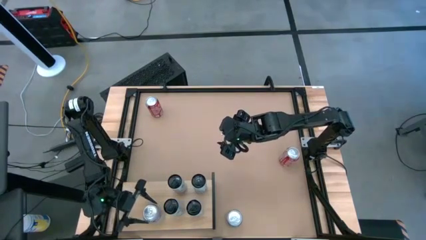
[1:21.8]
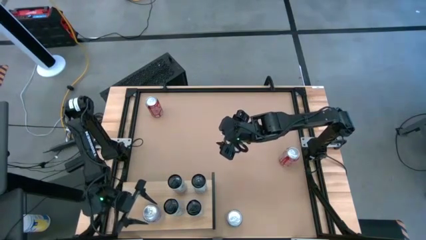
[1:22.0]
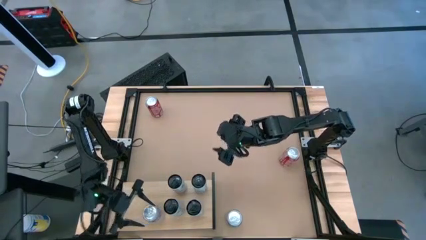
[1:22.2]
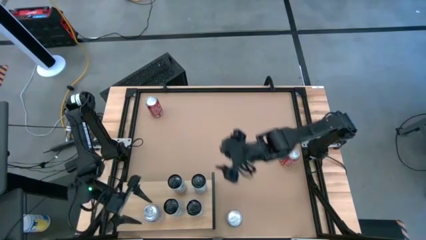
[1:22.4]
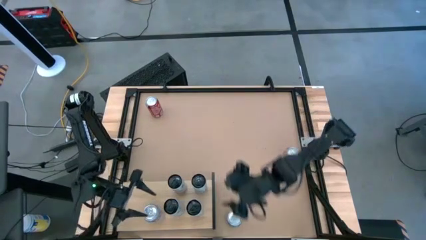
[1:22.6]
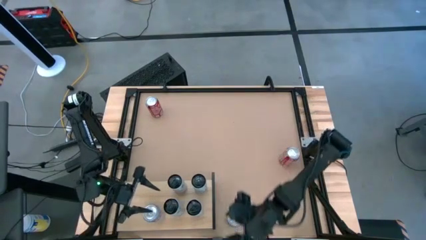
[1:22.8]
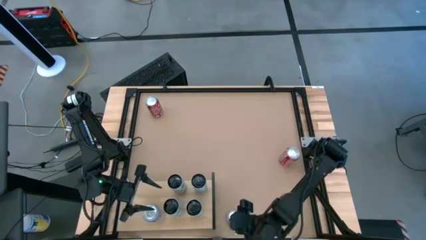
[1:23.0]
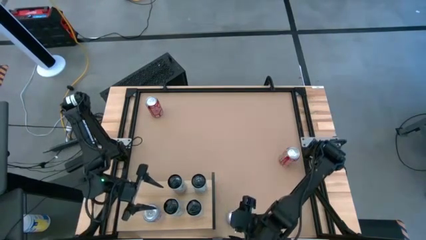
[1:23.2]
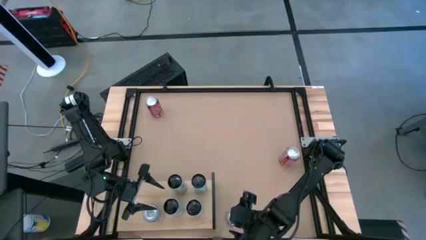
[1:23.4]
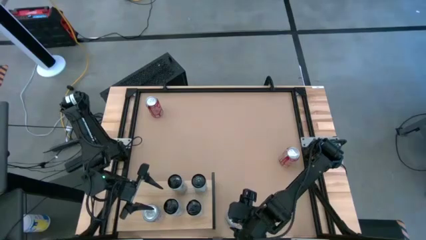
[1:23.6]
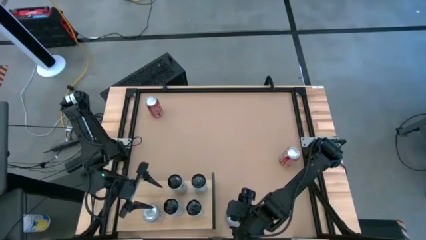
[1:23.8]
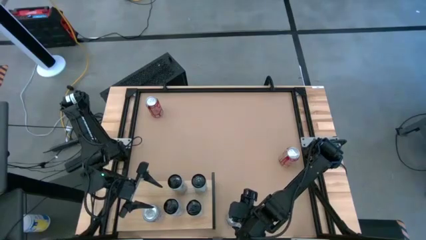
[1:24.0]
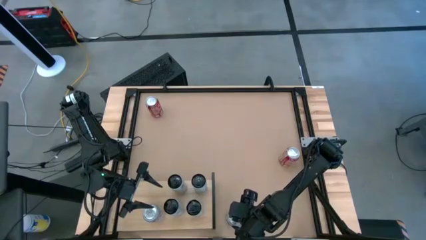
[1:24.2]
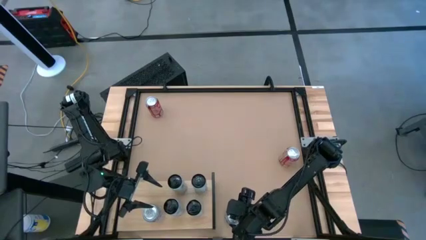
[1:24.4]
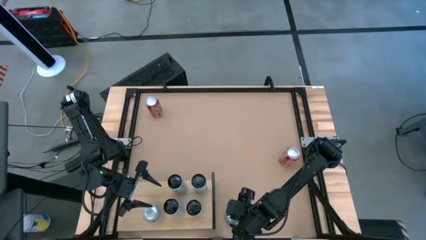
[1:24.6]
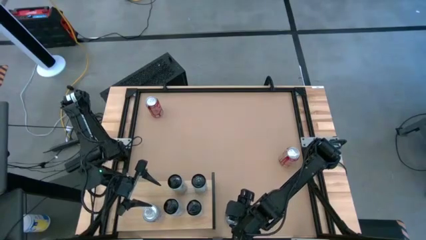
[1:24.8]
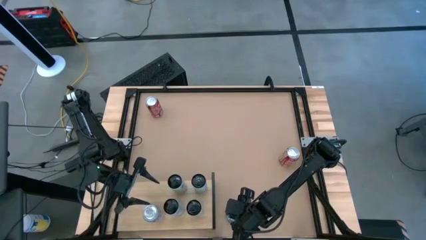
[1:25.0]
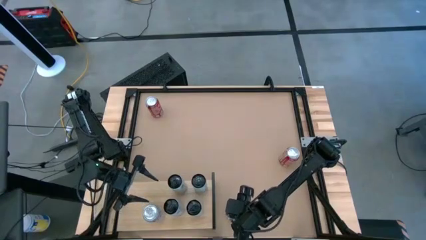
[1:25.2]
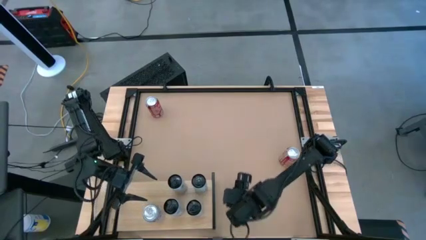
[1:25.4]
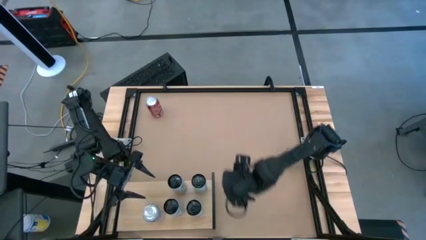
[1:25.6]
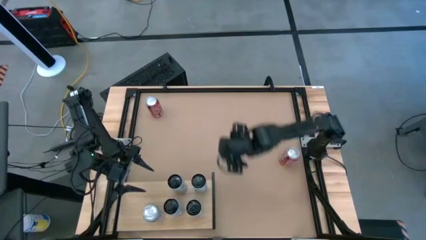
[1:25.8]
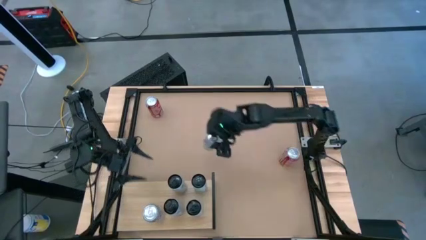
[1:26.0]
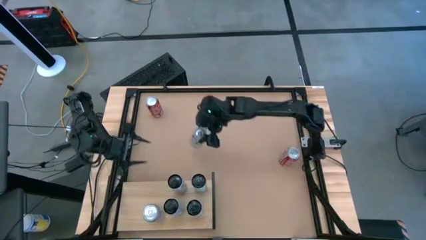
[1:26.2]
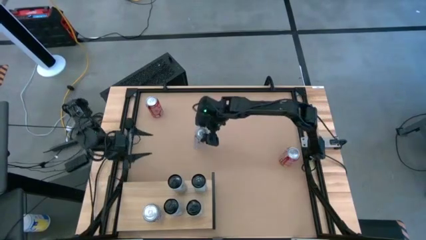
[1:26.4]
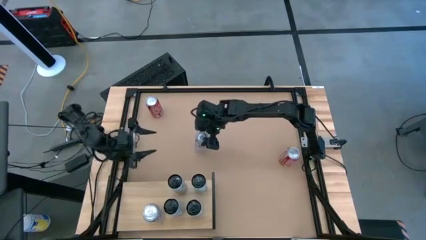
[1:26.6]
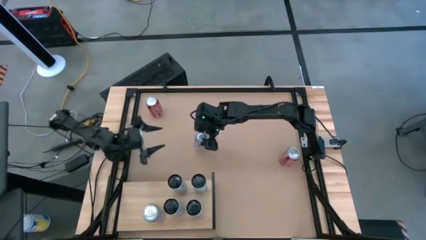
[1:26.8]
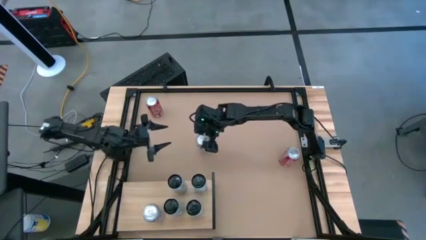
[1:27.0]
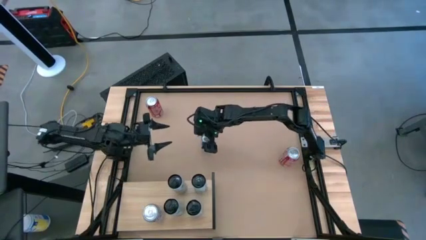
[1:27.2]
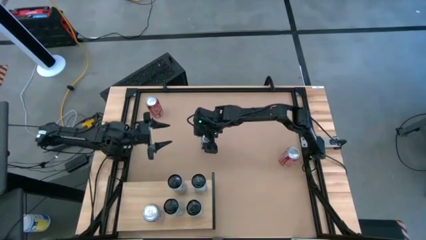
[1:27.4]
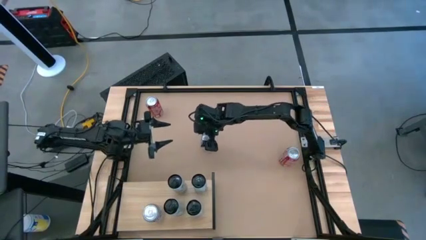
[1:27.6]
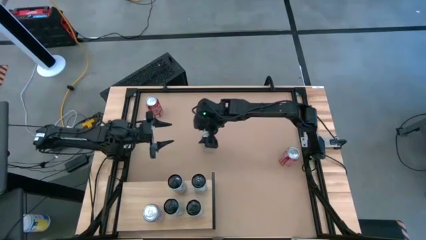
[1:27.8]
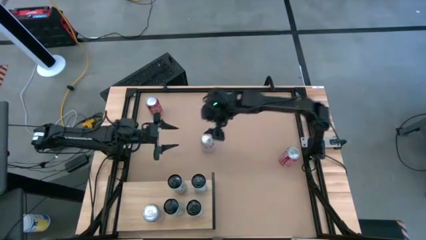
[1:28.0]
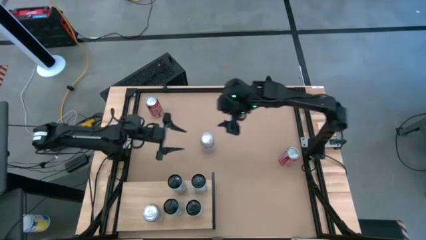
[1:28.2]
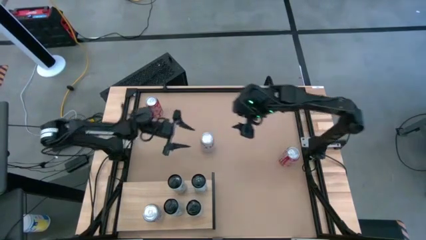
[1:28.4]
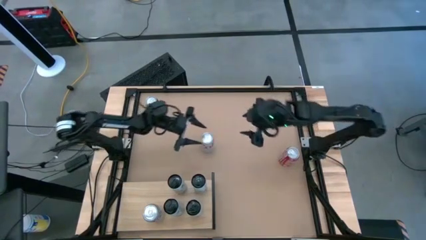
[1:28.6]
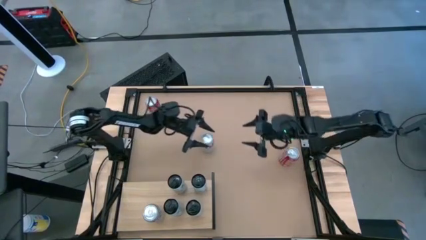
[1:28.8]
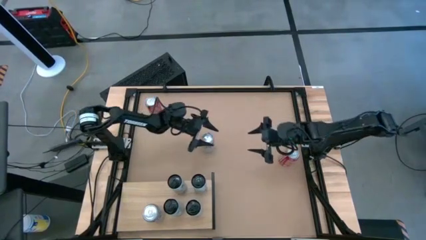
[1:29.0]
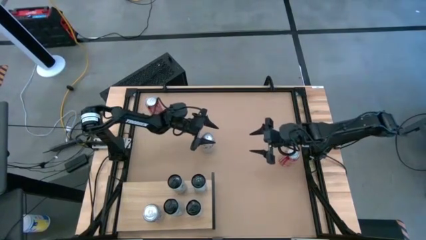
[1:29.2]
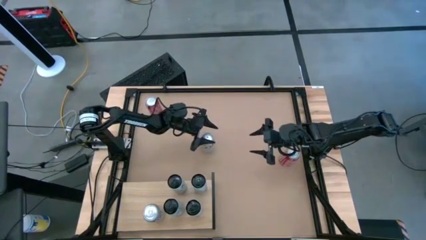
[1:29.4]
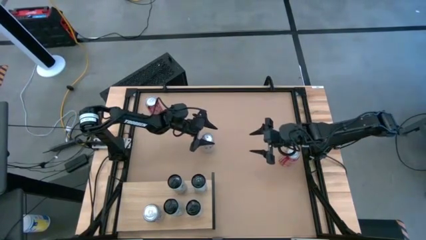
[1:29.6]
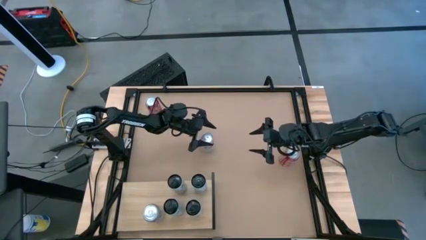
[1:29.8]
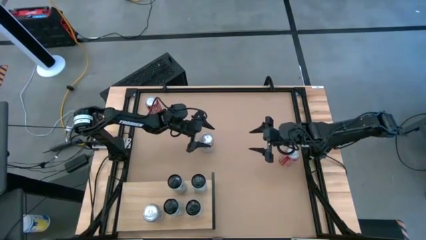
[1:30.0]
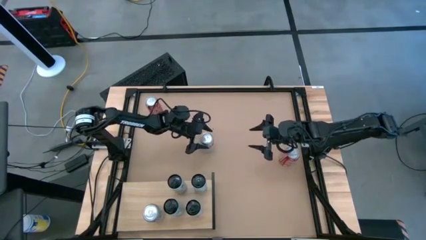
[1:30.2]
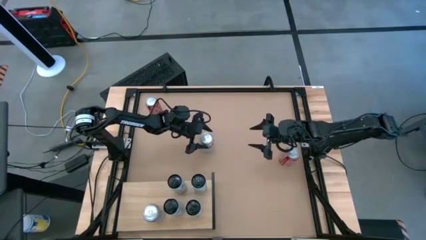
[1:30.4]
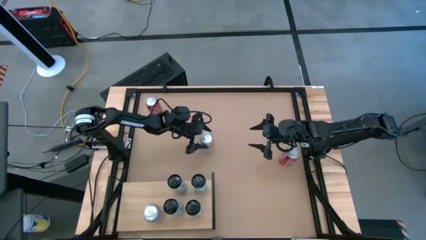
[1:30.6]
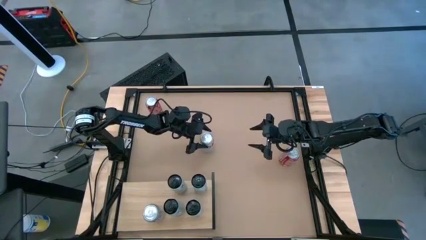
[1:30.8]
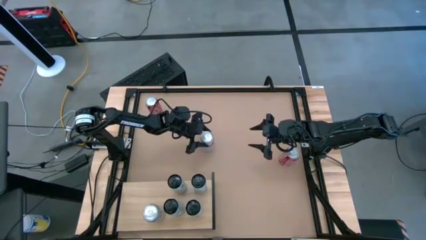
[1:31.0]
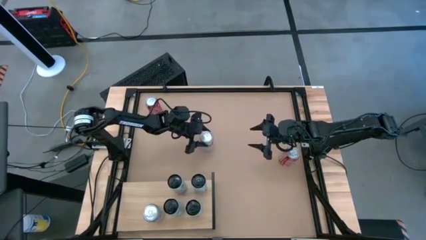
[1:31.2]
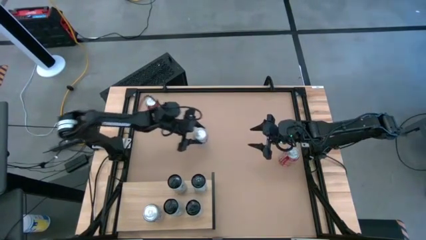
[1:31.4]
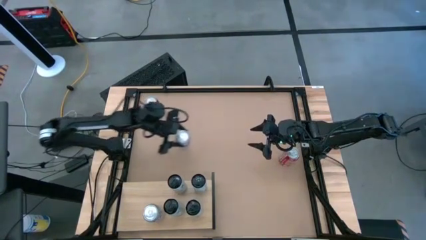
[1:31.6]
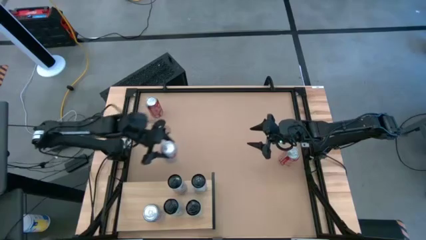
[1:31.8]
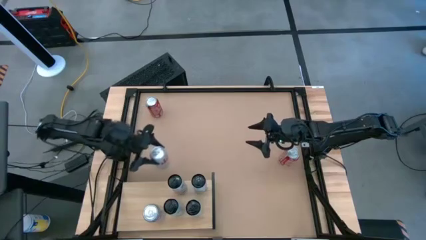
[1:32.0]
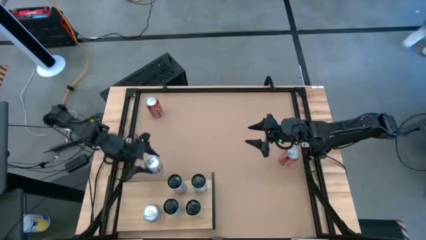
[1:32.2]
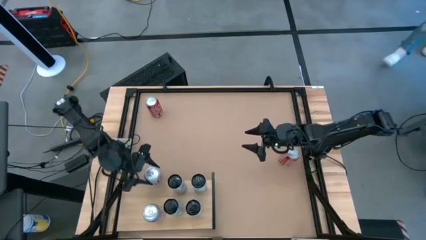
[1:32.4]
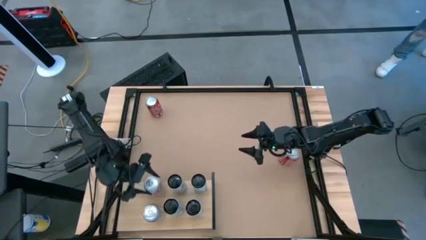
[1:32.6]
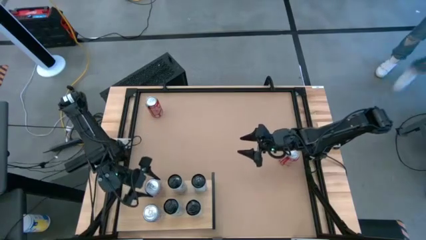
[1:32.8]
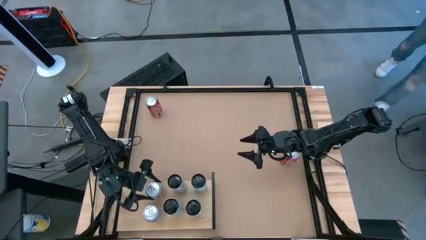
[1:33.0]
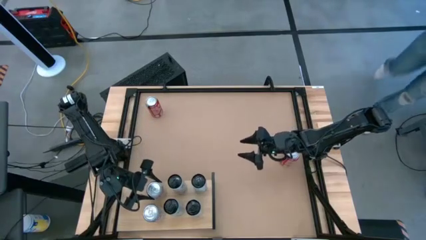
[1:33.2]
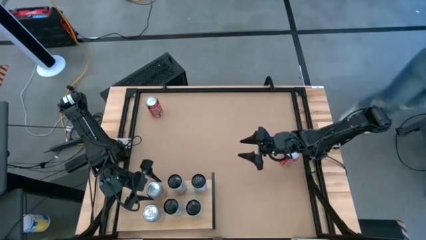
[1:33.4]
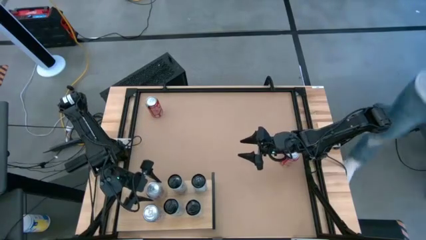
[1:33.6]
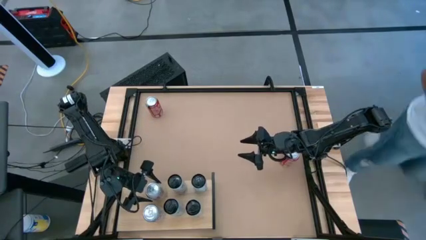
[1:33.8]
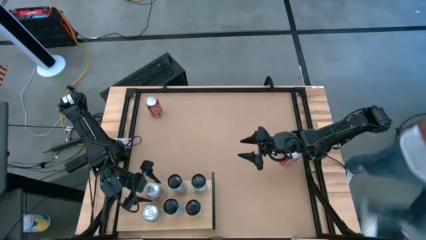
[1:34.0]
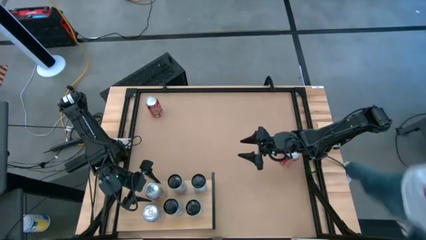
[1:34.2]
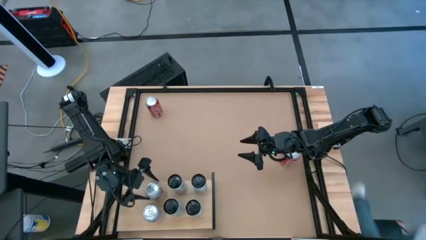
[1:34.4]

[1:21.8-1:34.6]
Task: Place canned beverage on shelf
Put the silver soda can on the shelf aligned with the other silver soda can
